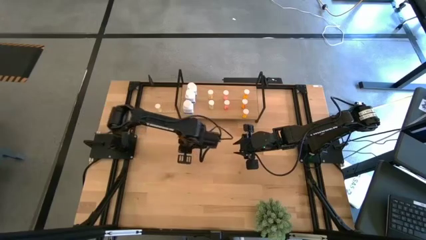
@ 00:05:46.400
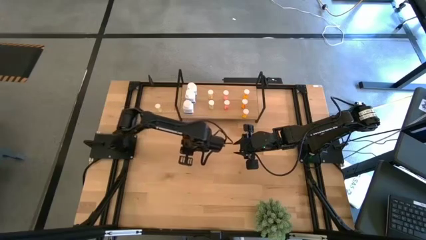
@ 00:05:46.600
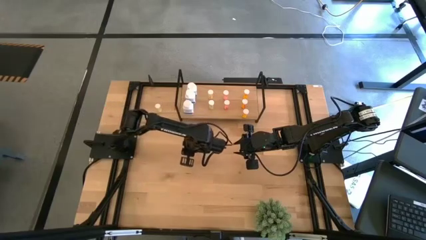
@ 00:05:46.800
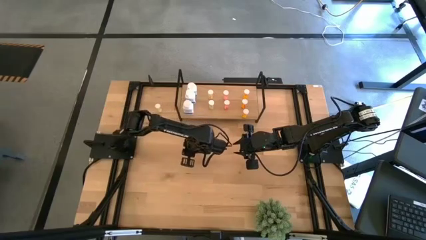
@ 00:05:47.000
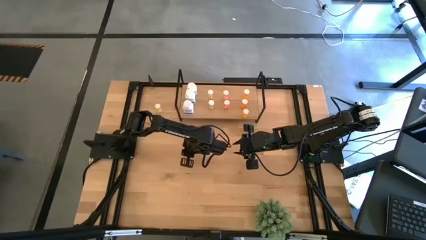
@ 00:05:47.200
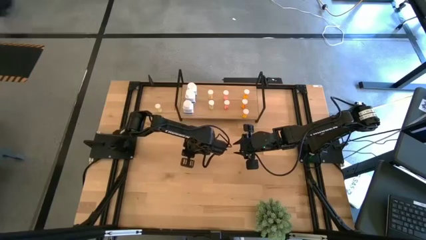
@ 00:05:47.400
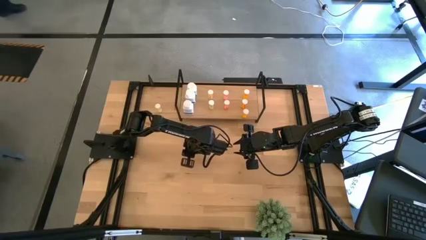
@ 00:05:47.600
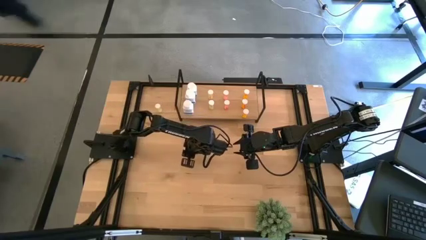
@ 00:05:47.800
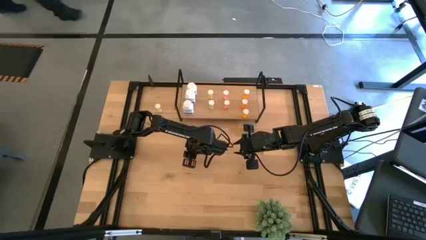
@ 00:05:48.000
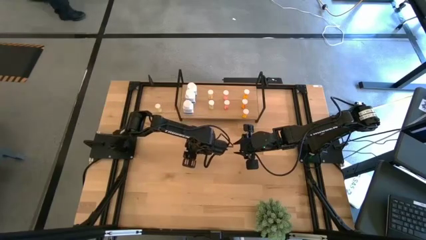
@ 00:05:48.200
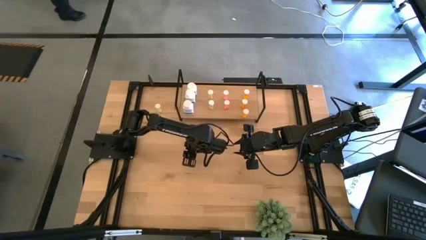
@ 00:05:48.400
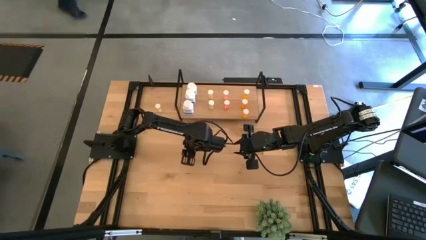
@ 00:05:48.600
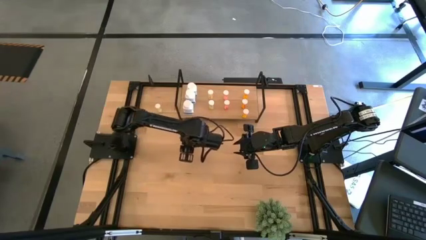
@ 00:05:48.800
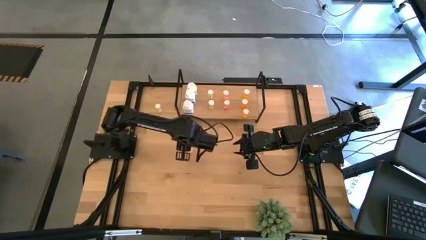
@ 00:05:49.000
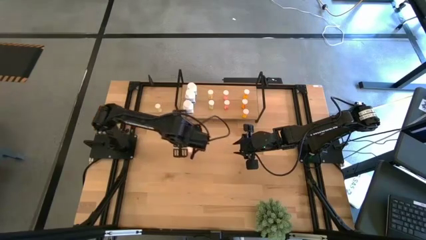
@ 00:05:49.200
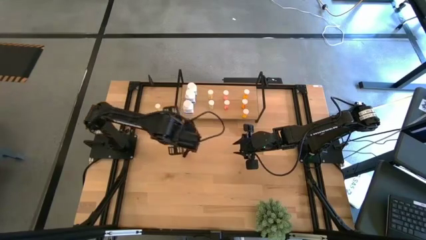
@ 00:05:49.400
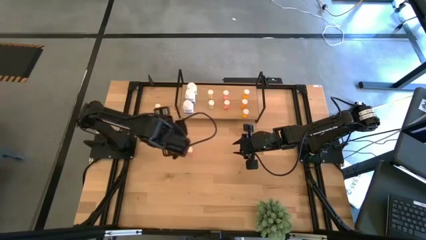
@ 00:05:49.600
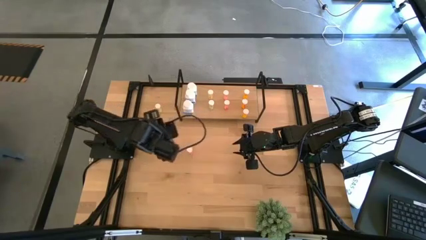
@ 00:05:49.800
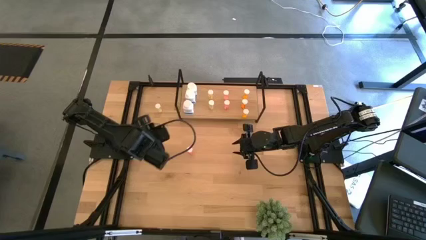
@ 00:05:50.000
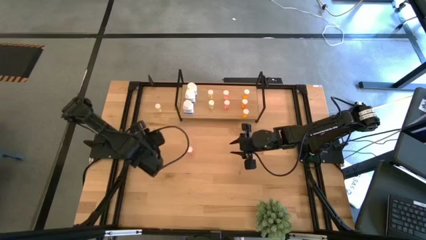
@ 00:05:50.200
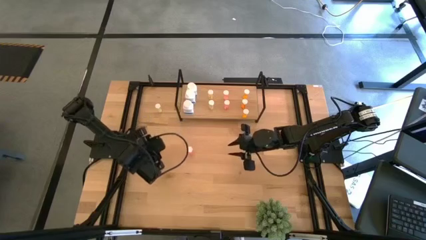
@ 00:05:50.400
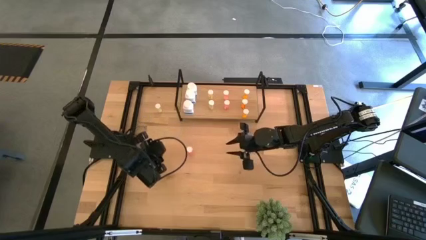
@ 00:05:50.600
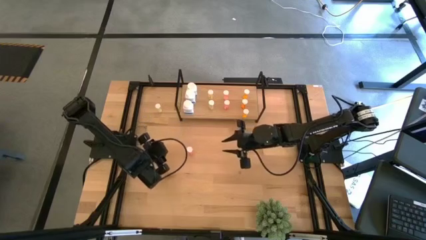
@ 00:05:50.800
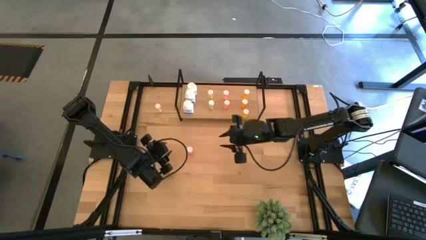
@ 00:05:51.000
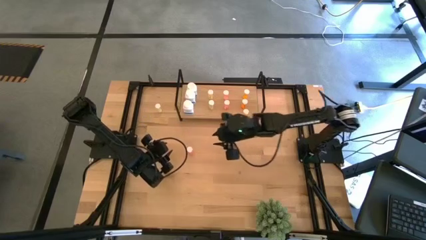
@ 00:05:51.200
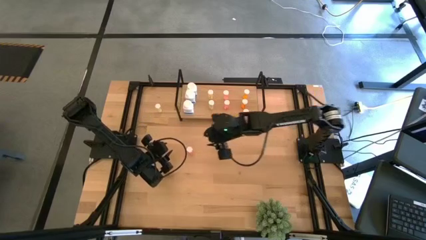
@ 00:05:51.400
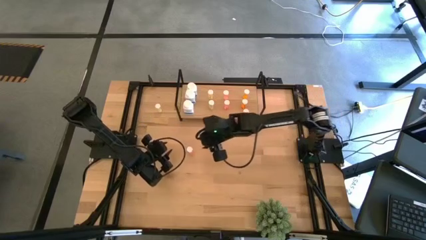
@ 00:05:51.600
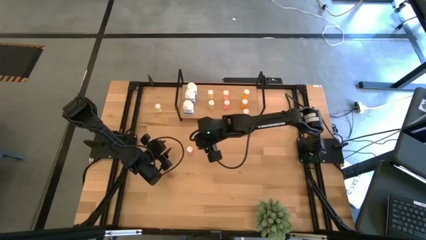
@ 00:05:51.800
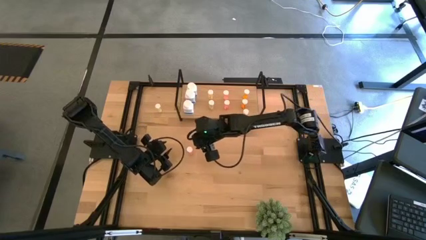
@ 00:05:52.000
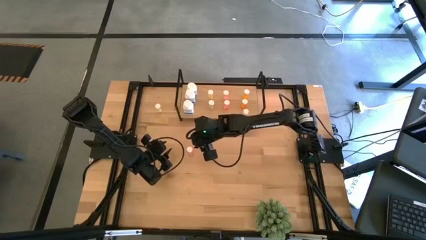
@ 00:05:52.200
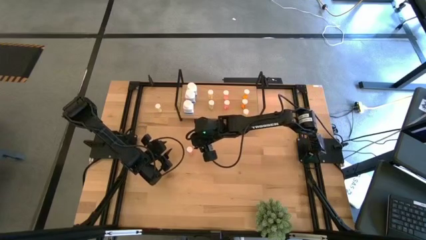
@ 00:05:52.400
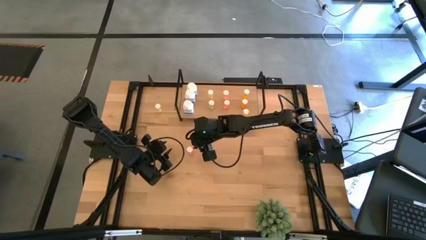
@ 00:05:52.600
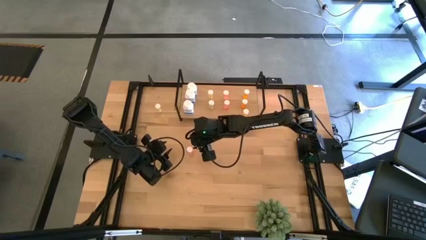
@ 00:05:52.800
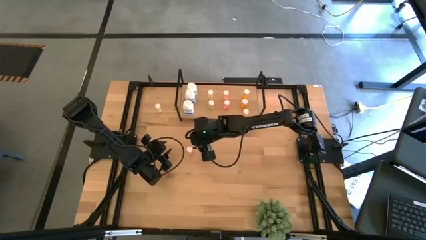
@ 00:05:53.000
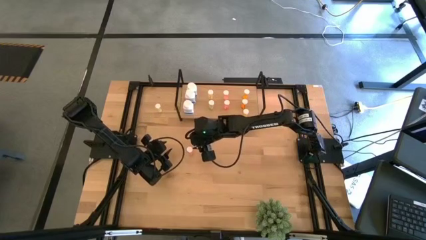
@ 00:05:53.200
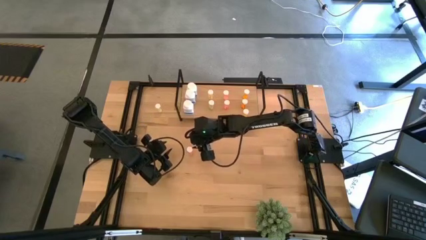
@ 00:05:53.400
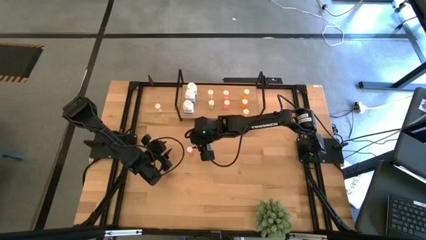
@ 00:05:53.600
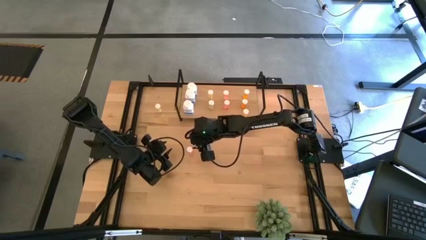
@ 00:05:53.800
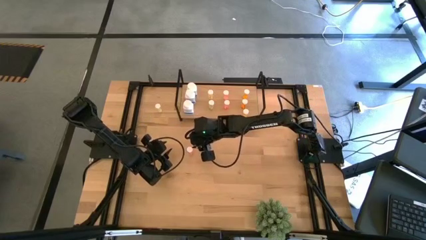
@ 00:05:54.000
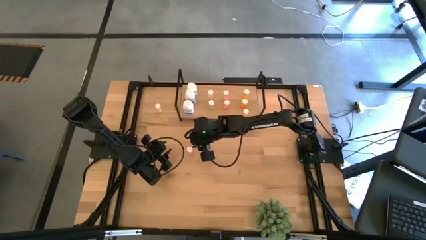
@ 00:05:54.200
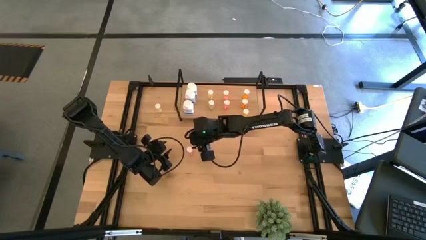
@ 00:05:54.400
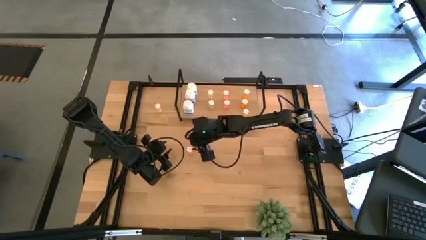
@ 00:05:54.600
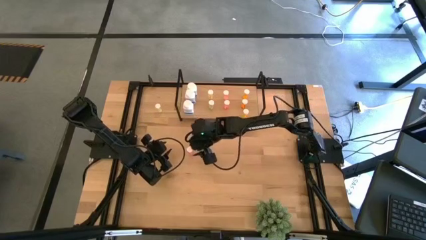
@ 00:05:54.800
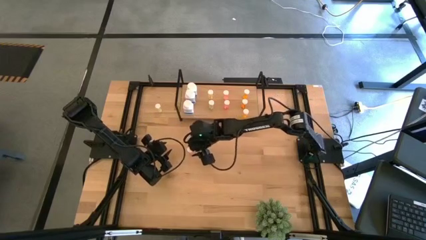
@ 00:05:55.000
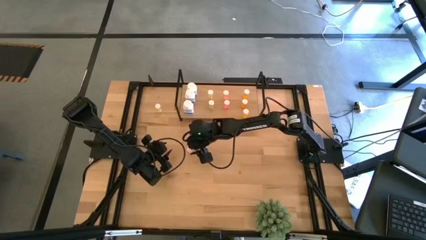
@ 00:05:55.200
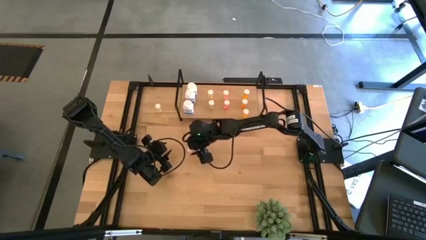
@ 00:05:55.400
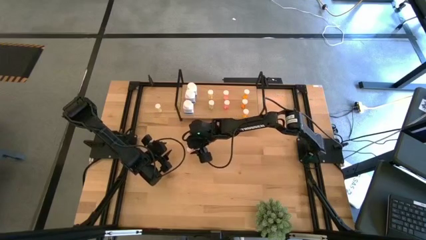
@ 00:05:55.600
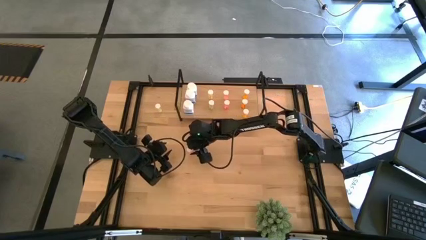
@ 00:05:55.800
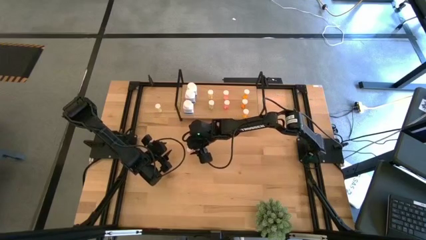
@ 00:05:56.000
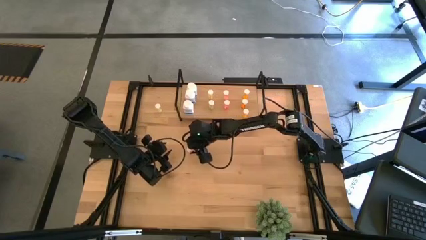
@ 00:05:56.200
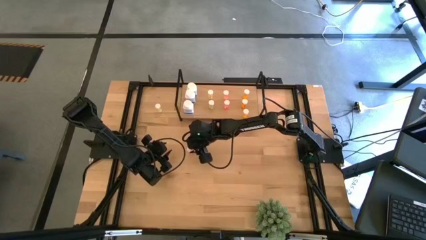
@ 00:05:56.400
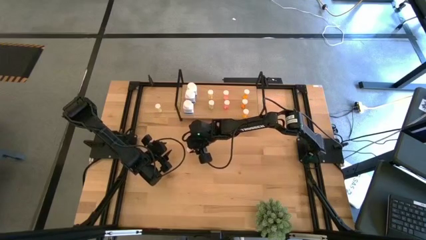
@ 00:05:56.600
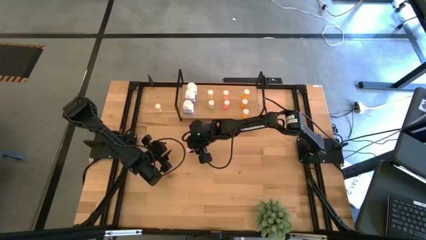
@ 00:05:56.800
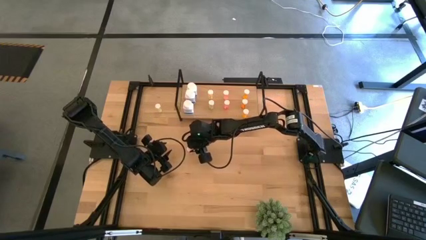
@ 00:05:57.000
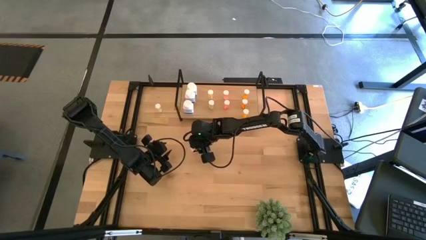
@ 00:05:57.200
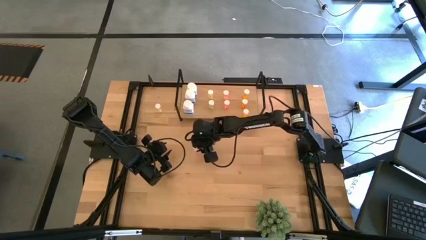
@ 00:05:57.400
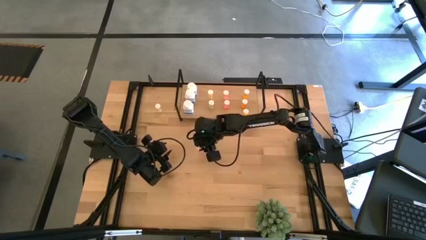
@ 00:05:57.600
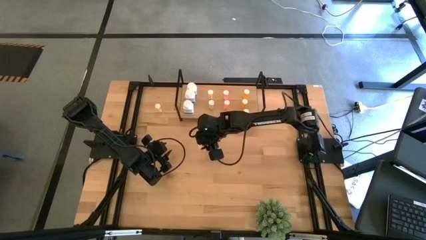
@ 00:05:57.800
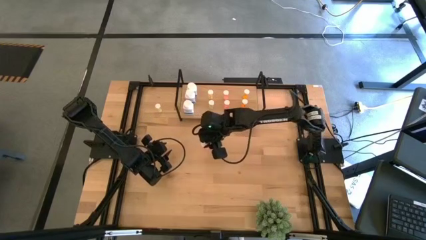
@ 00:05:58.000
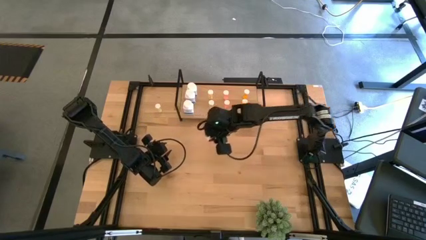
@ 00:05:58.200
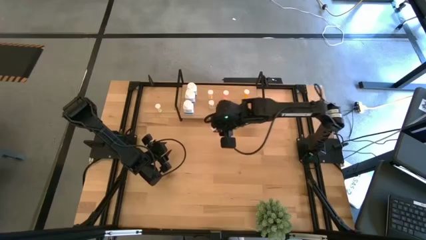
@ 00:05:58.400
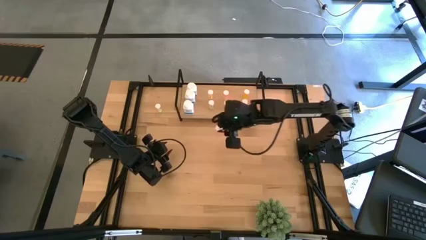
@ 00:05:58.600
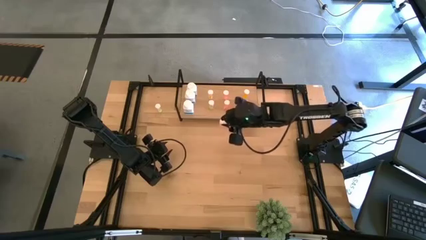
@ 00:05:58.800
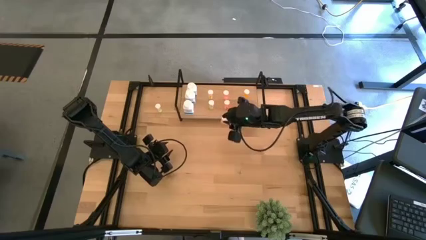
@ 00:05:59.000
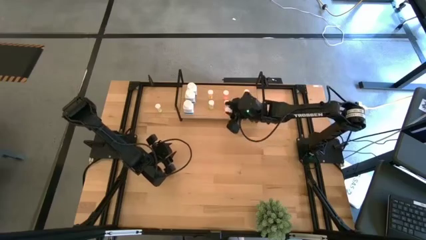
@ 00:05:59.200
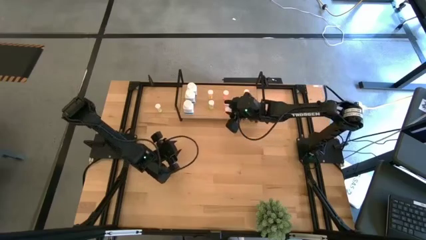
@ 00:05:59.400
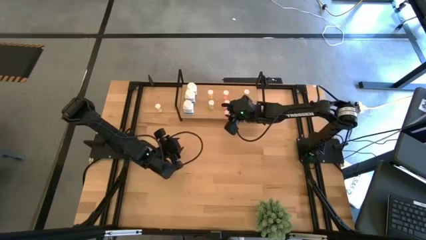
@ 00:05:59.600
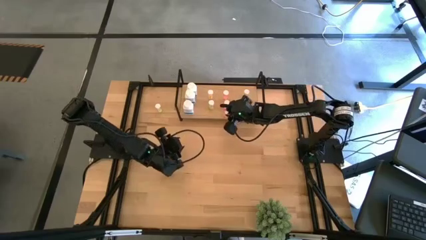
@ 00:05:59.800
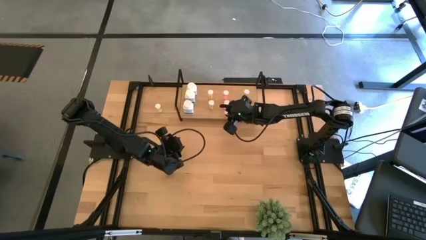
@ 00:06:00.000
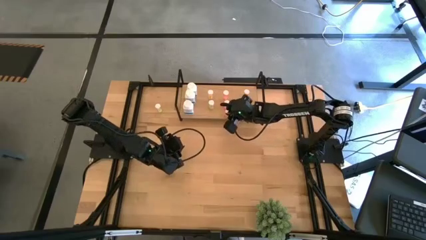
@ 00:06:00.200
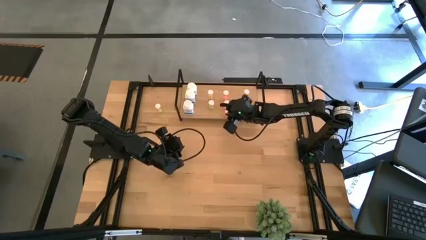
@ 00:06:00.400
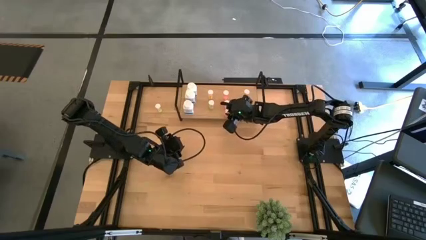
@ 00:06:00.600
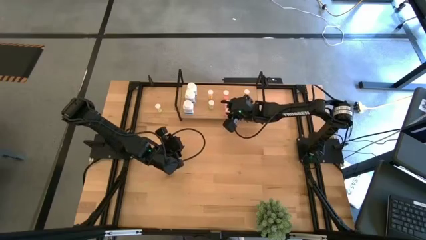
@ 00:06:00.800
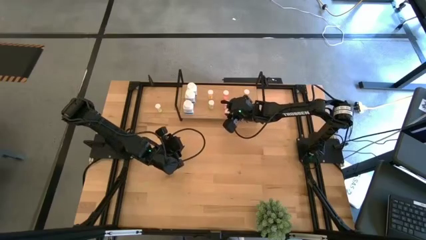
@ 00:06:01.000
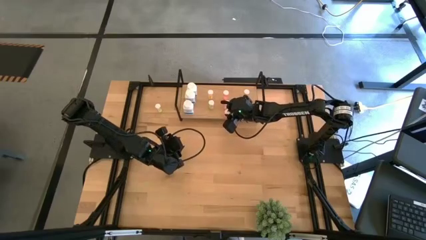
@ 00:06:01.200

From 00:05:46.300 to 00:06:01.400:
Task: Pick and place medicine bottles onto shelf by color
Put the red pill bottle on the shelf aligned with the other red pill bottles
